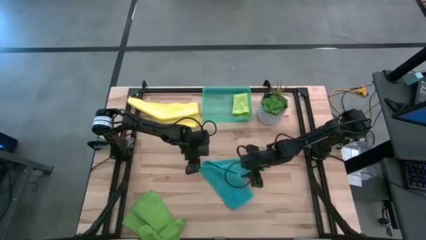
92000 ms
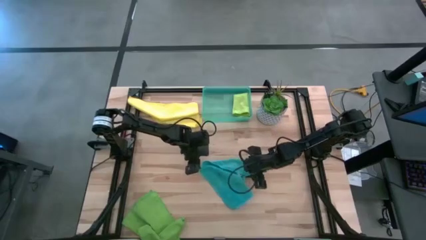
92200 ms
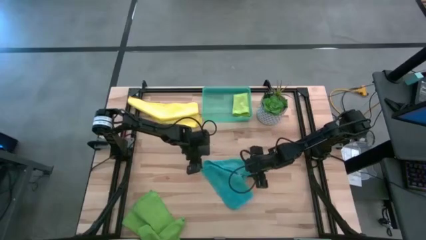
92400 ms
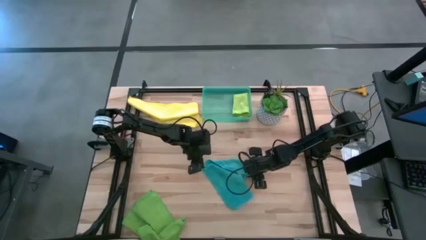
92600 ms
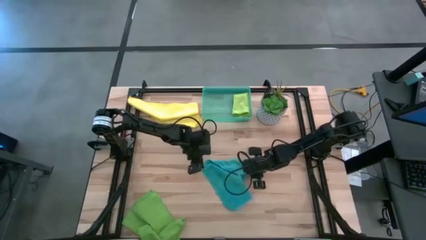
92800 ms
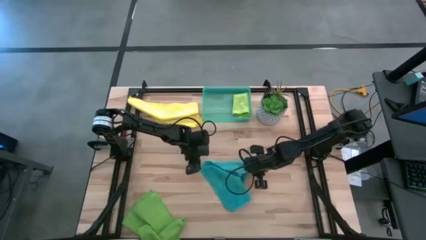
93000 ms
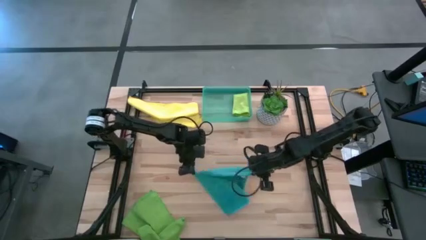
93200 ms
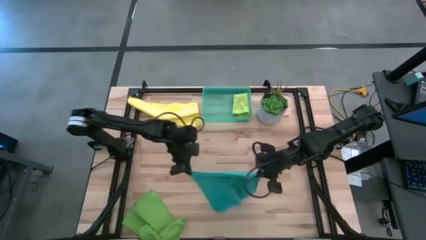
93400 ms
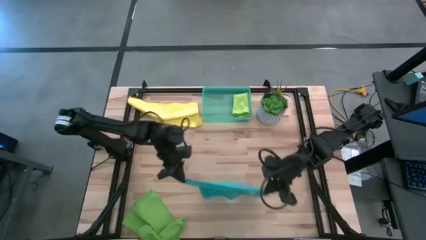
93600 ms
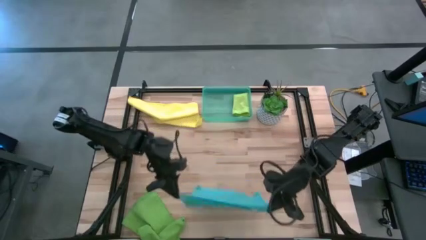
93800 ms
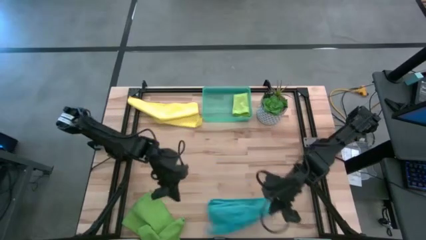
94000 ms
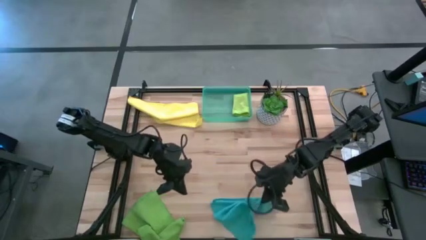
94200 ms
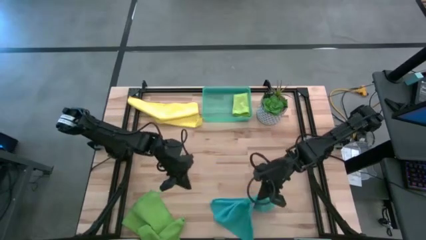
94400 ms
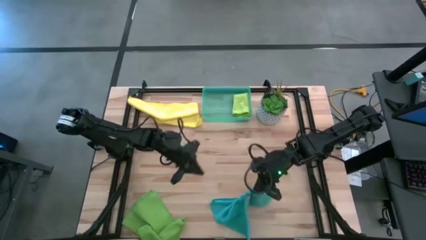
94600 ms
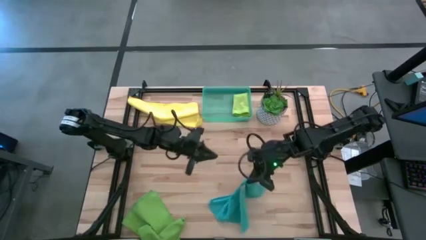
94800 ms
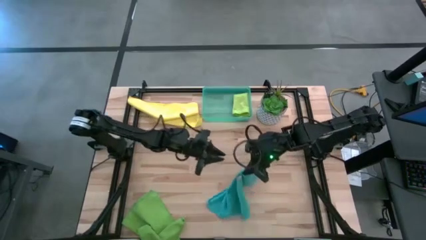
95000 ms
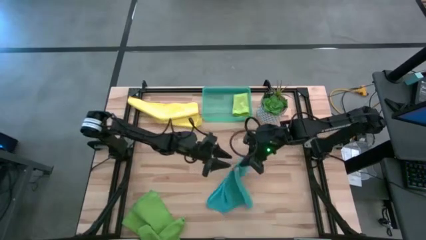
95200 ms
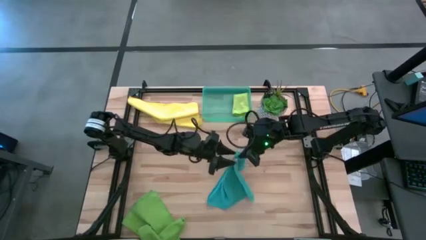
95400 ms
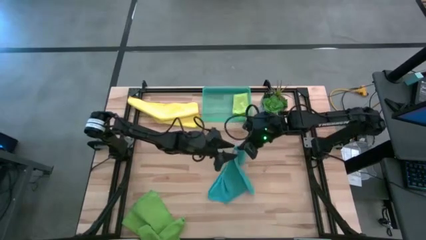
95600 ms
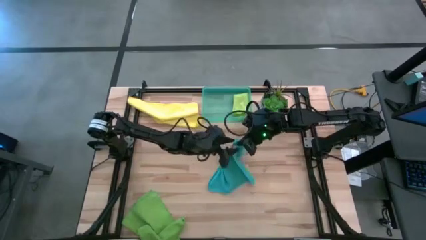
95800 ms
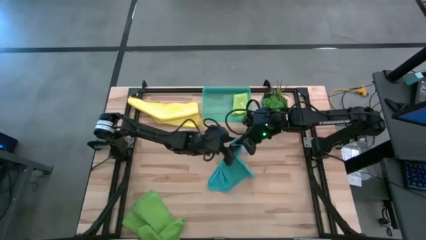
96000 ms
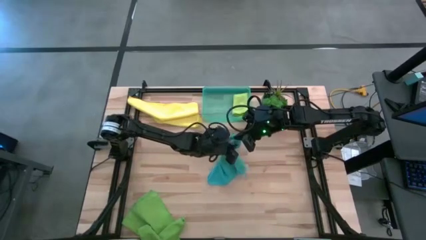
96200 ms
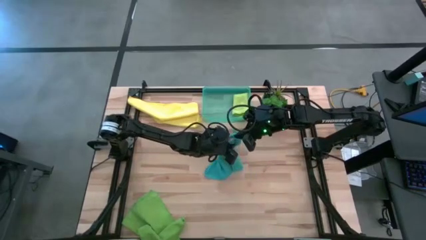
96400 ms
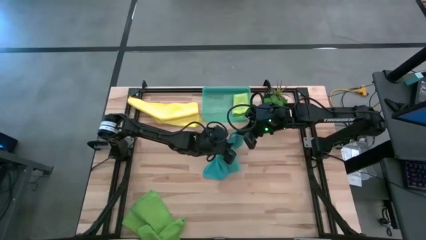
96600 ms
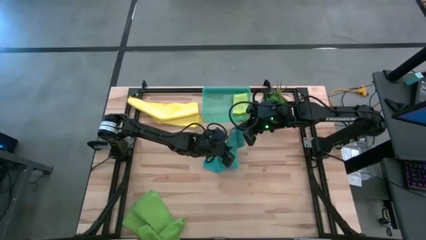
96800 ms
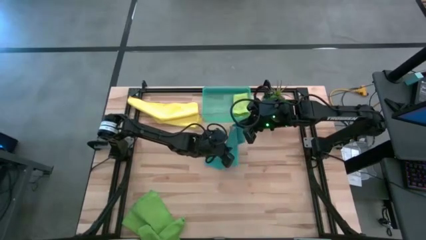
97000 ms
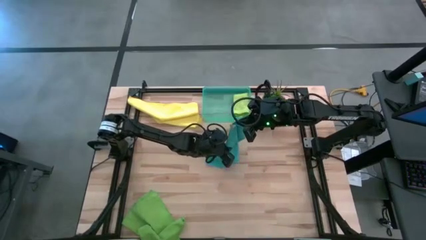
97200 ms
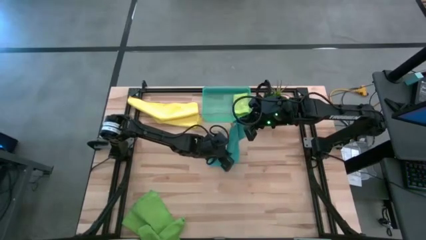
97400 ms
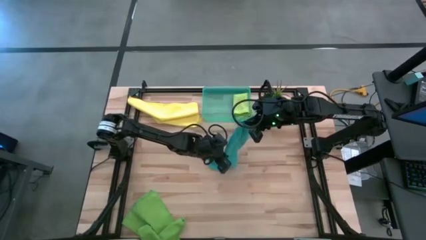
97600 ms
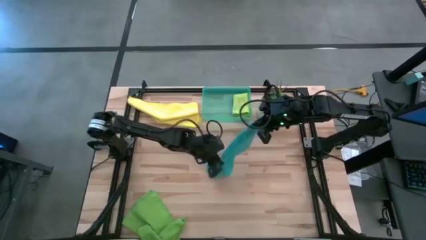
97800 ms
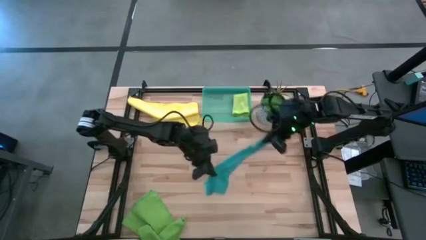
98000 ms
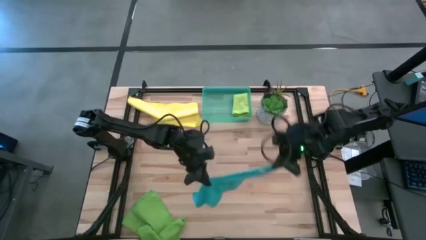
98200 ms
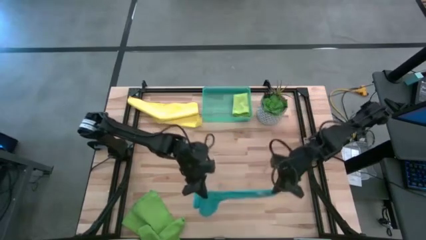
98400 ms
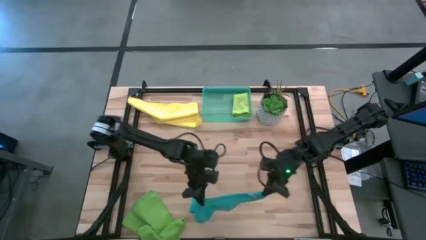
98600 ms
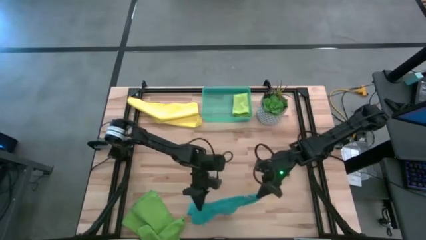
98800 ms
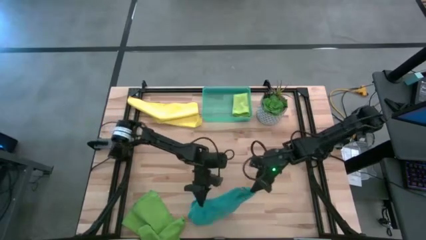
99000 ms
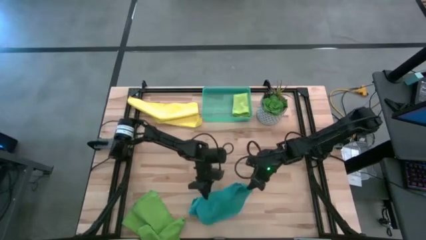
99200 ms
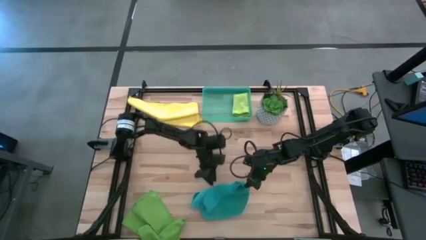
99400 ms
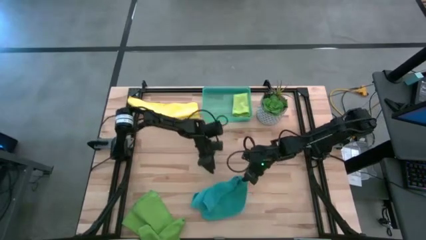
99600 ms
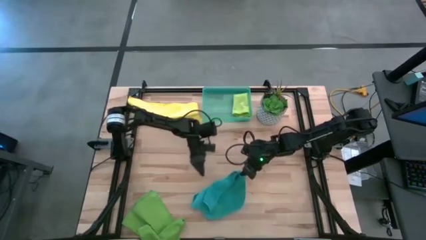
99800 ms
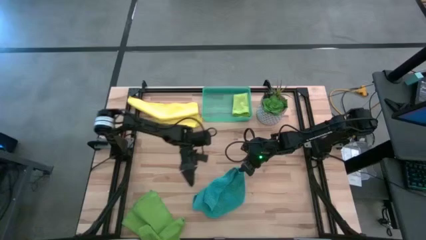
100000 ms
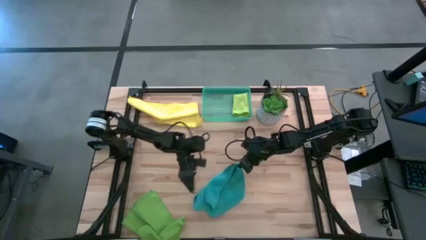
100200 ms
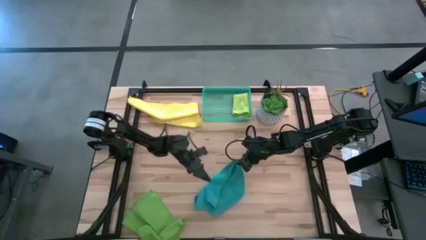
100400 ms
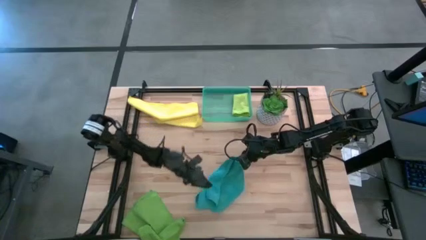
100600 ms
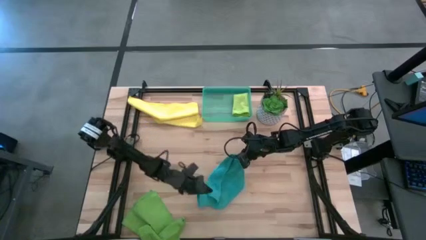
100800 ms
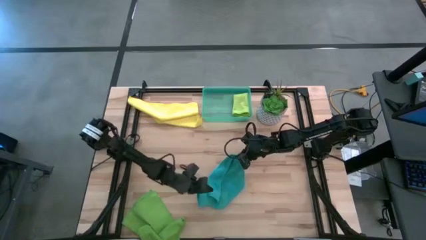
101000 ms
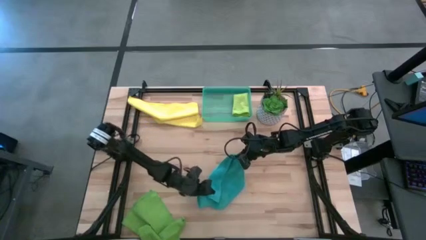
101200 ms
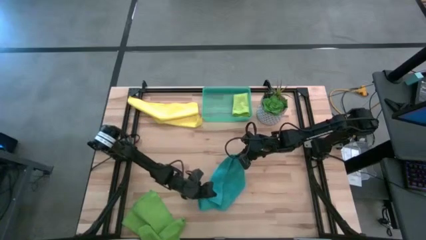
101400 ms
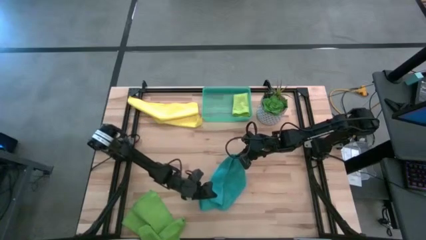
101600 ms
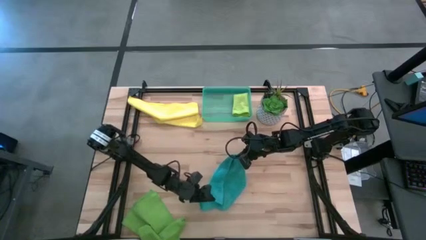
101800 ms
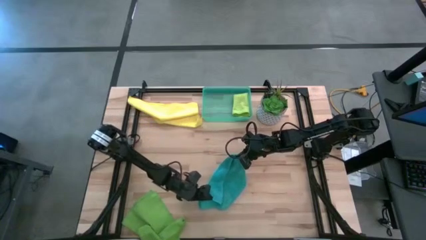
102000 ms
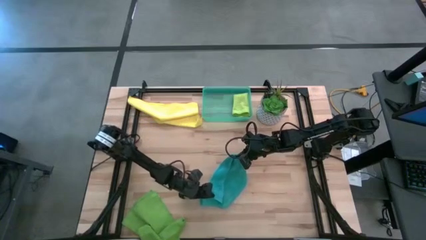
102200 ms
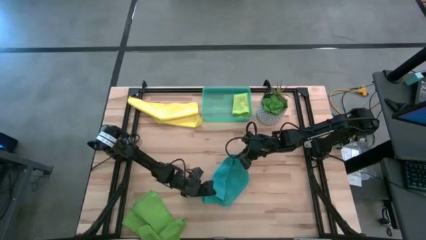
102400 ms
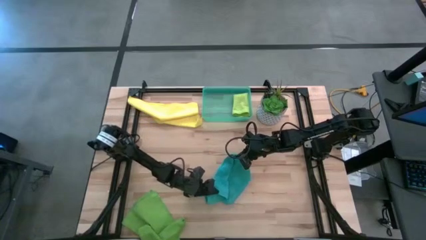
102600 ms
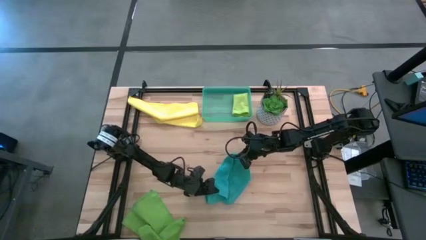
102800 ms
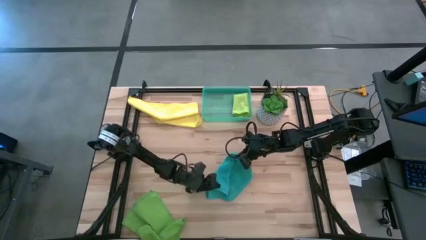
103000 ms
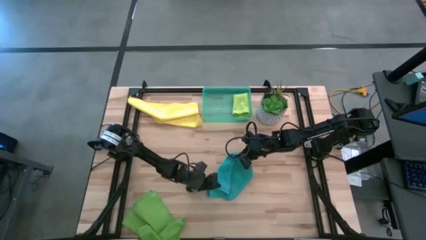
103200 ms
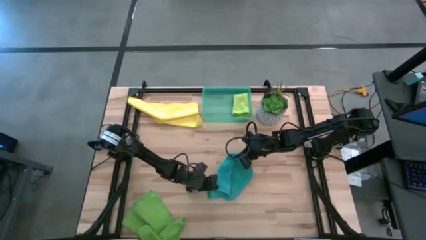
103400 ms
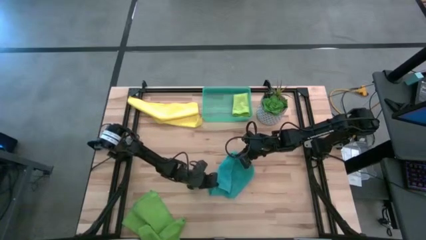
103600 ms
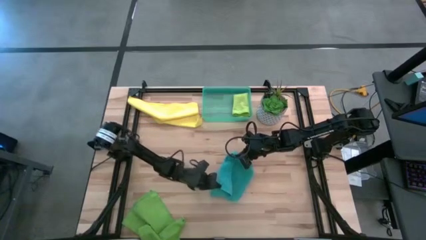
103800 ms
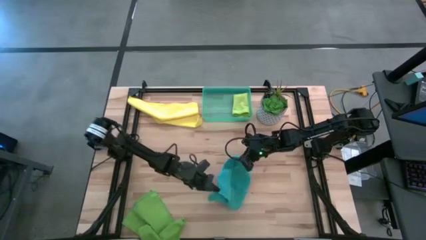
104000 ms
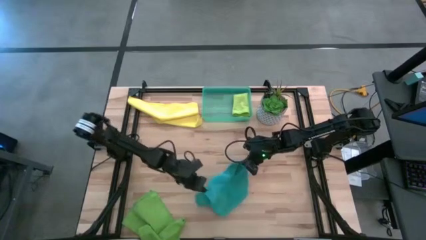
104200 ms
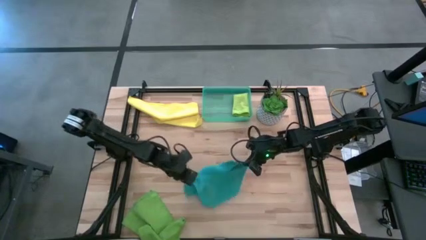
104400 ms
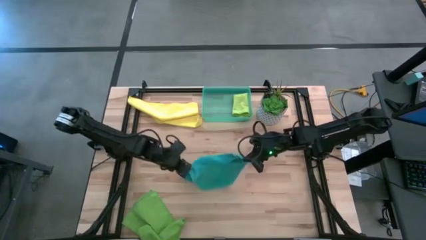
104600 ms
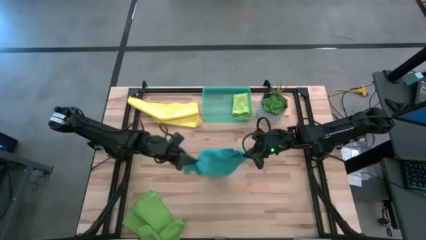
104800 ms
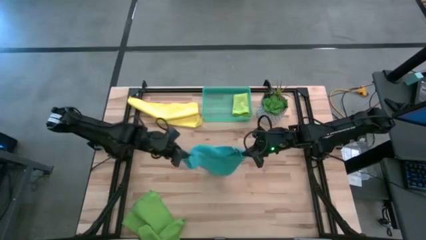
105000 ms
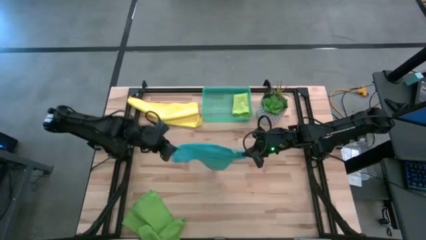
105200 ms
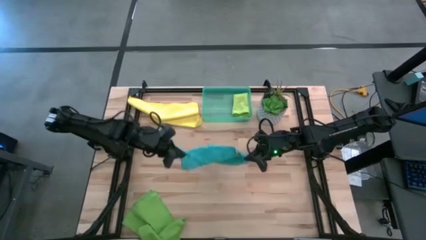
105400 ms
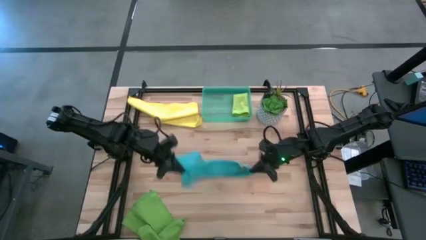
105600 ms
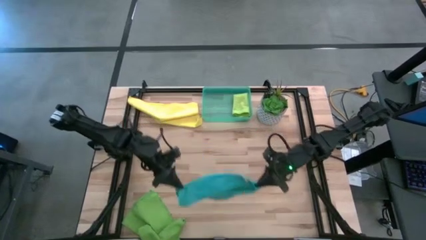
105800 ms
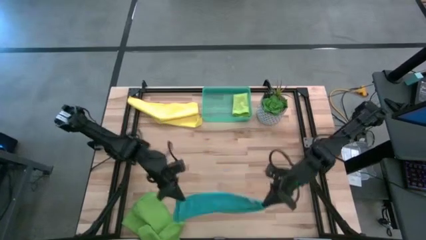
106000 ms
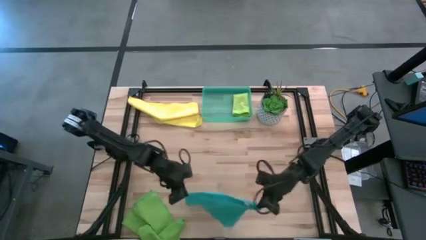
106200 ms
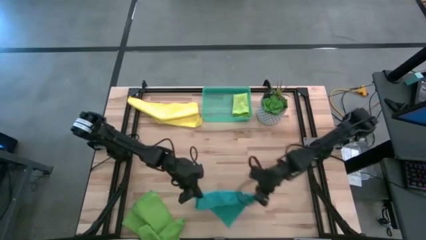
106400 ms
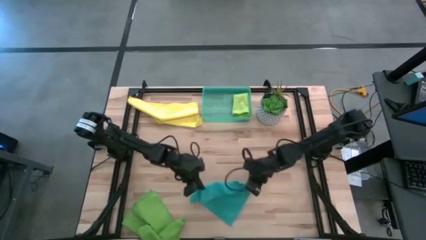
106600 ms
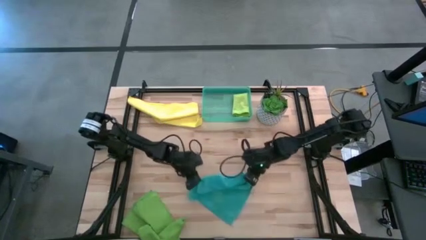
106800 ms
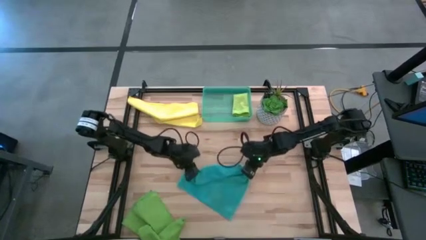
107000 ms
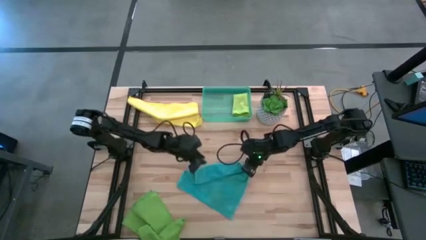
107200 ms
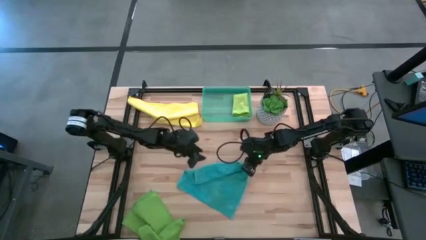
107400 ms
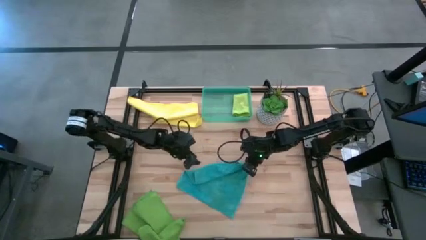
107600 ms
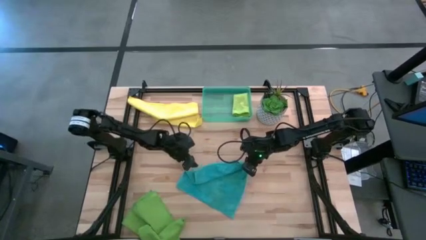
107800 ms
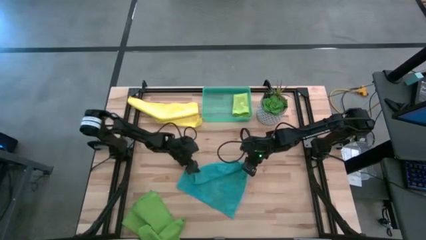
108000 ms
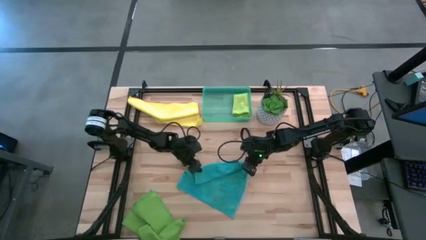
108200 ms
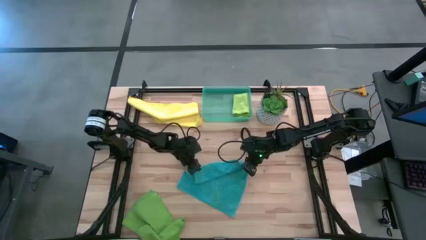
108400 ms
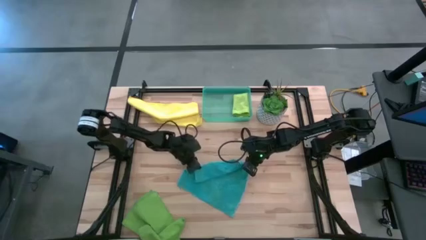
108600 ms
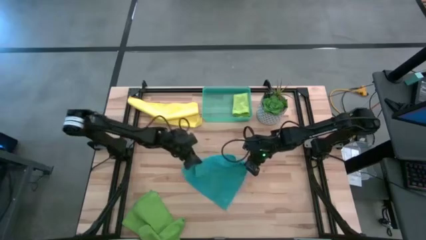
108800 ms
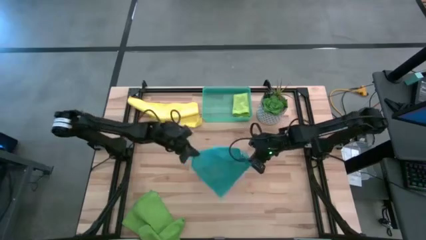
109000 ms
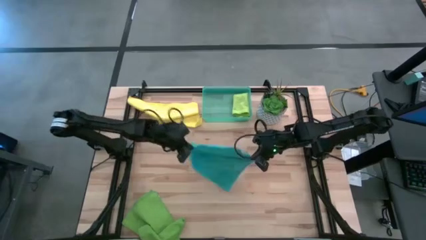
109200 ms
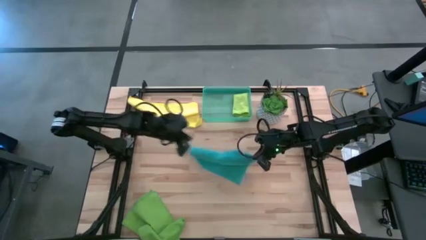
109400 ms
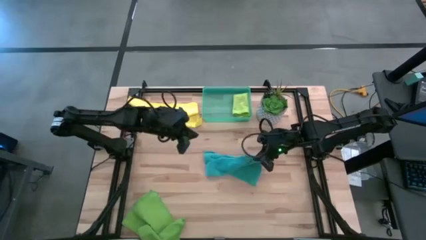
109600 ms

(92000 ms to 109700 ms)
Task: Fold microfiber towels
Fold the blue microfiber cloth
